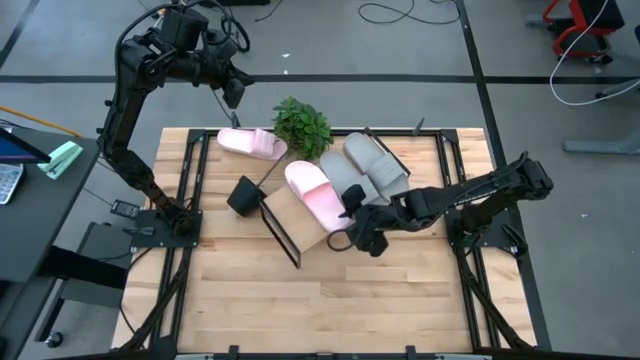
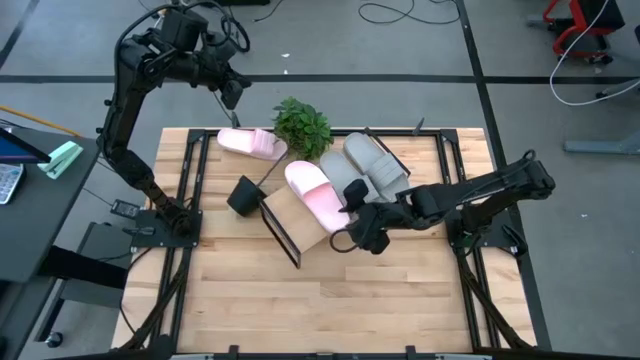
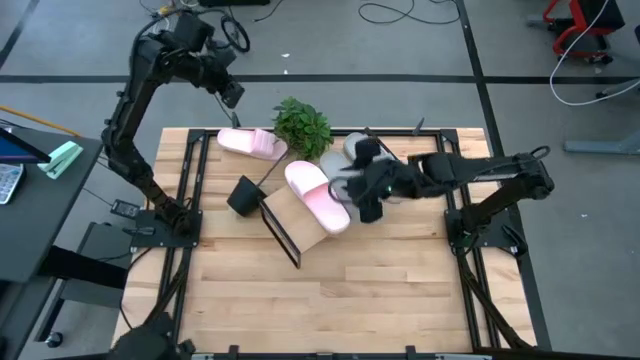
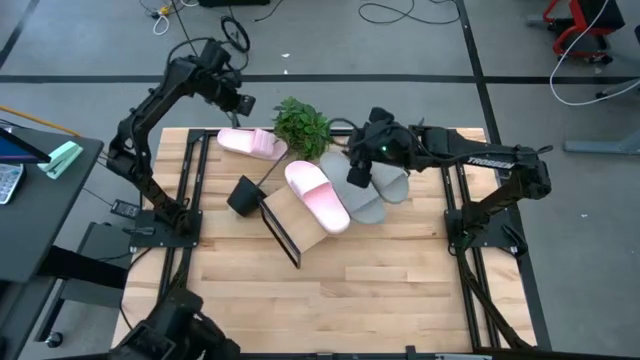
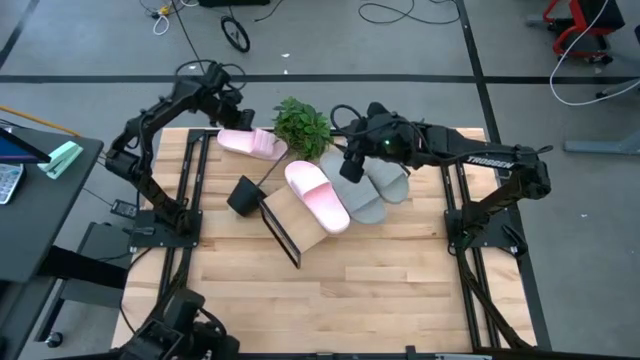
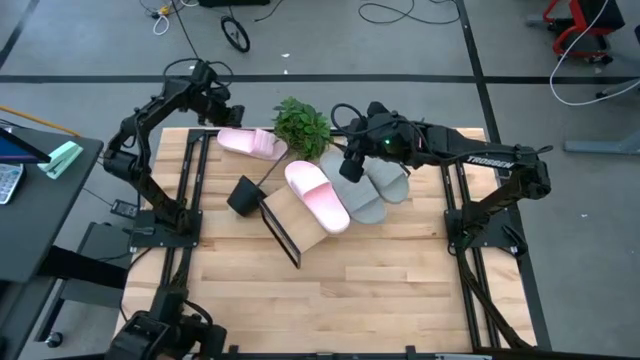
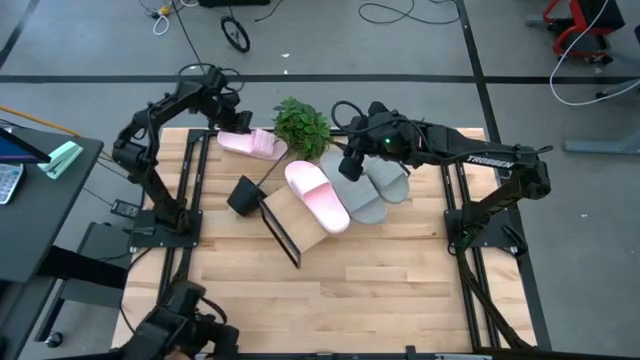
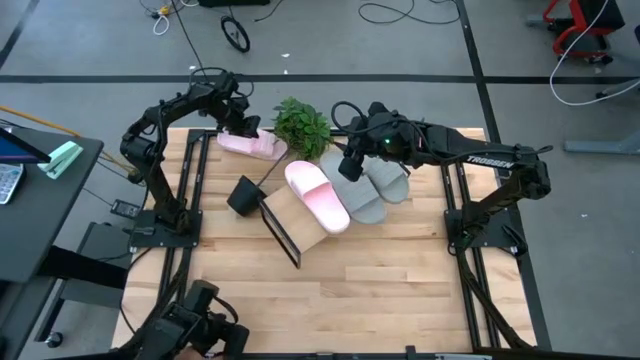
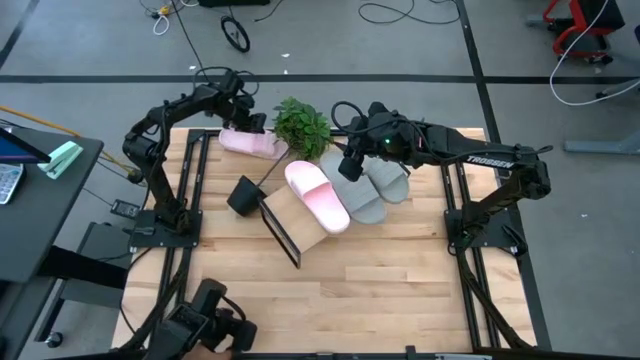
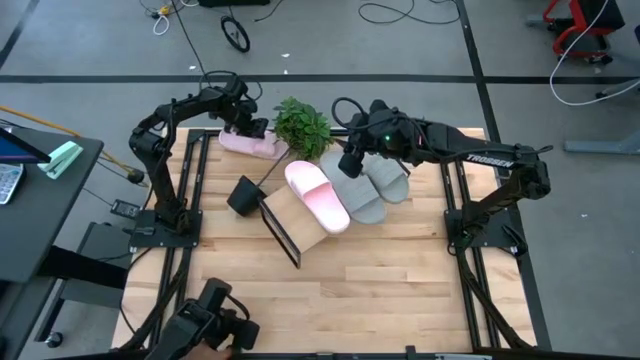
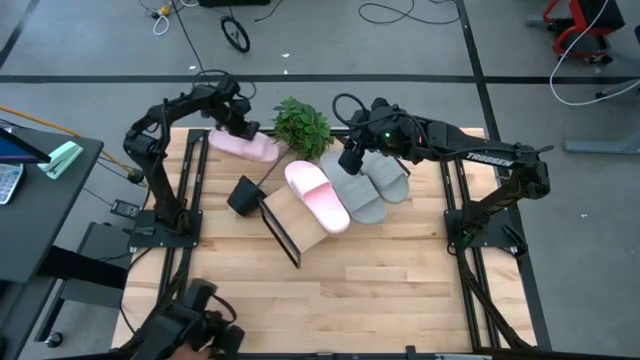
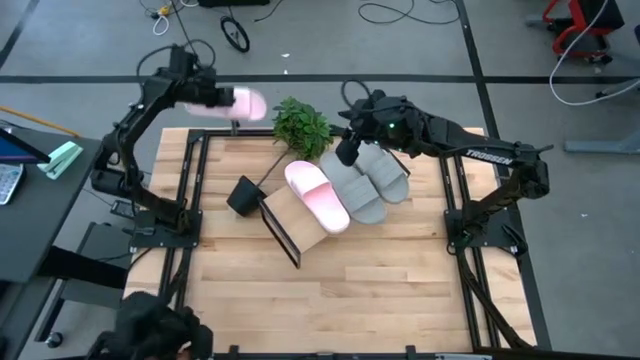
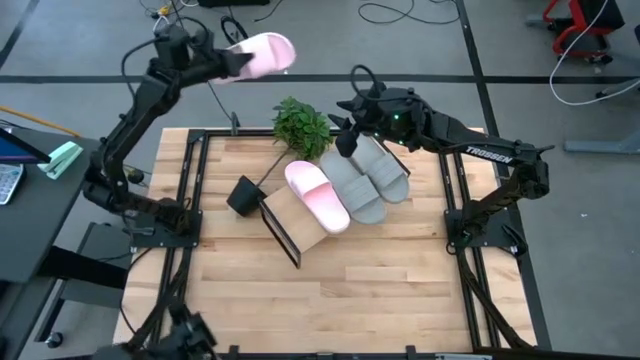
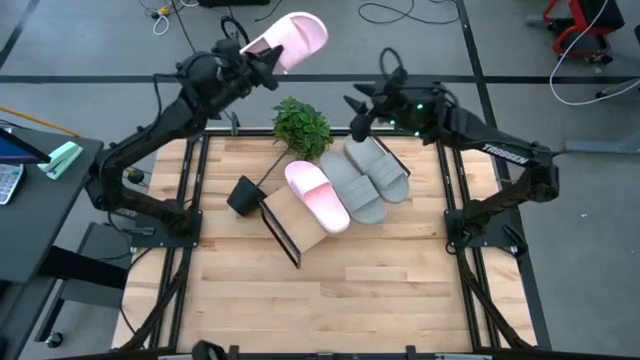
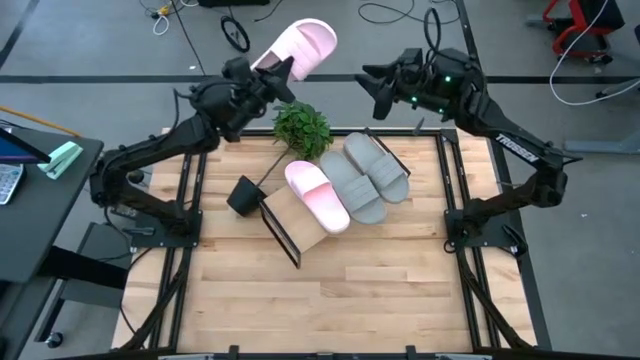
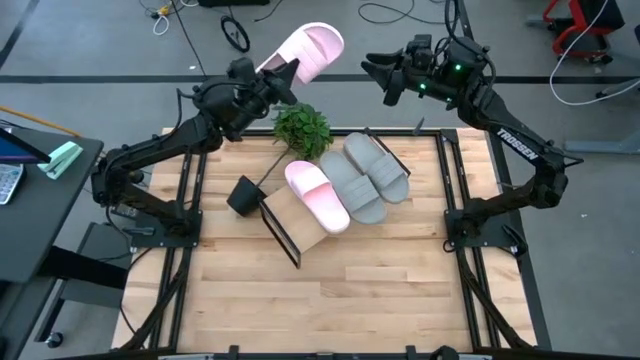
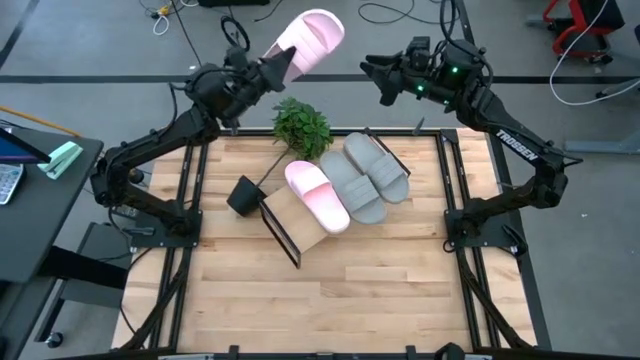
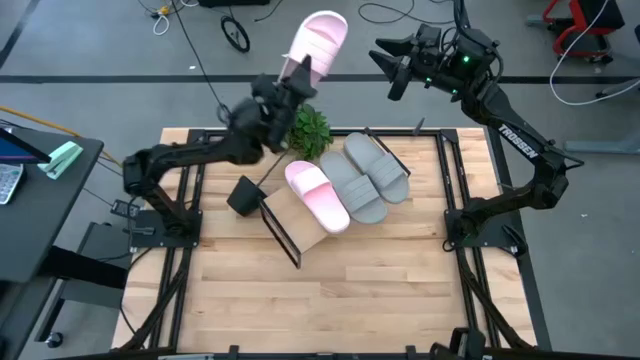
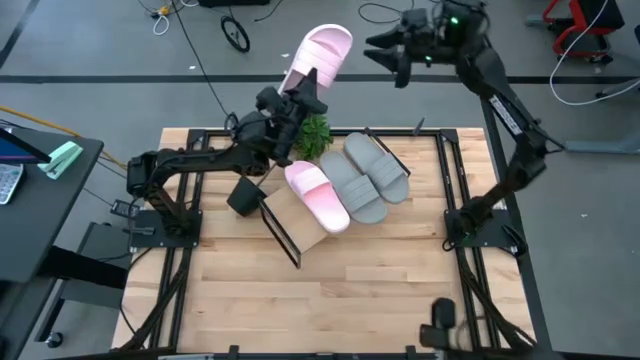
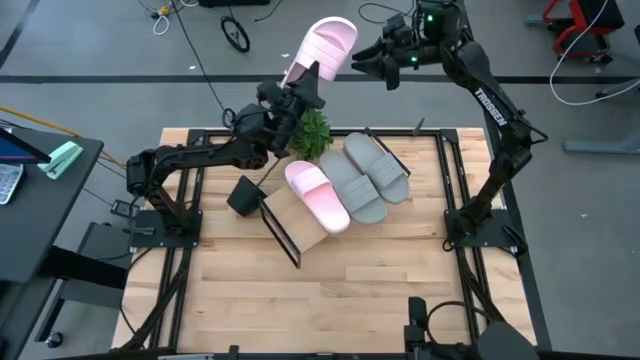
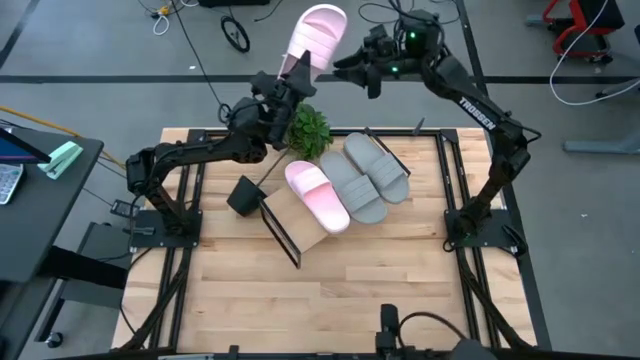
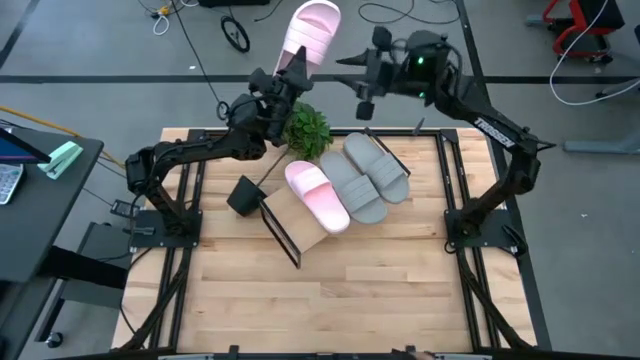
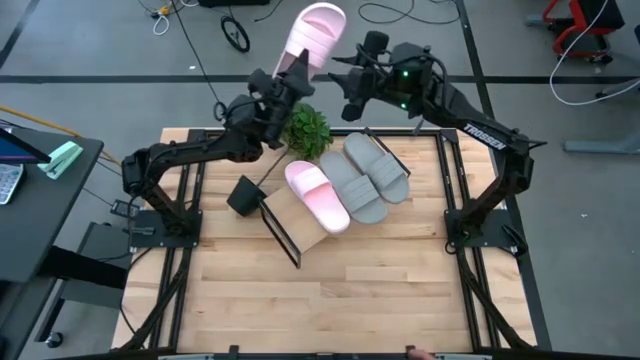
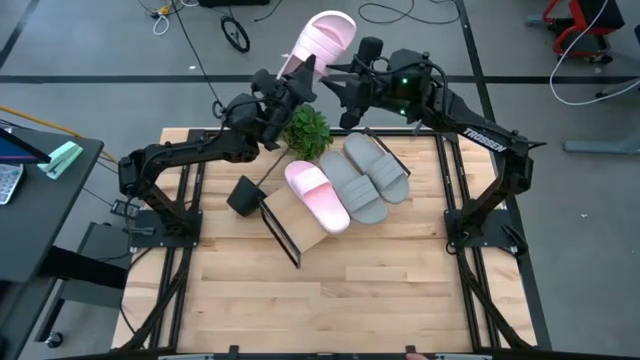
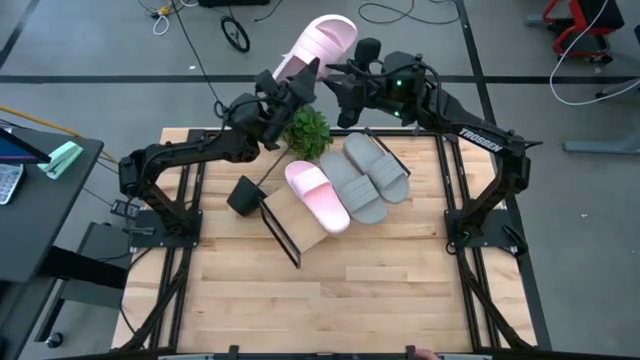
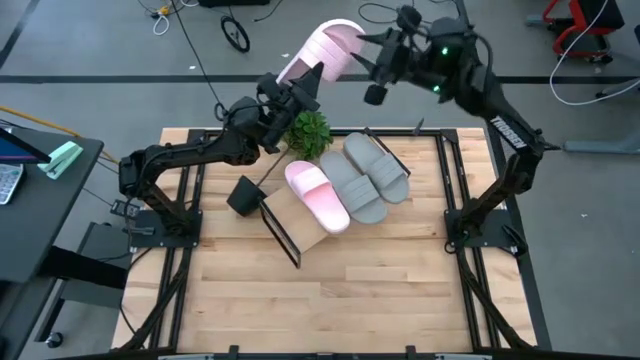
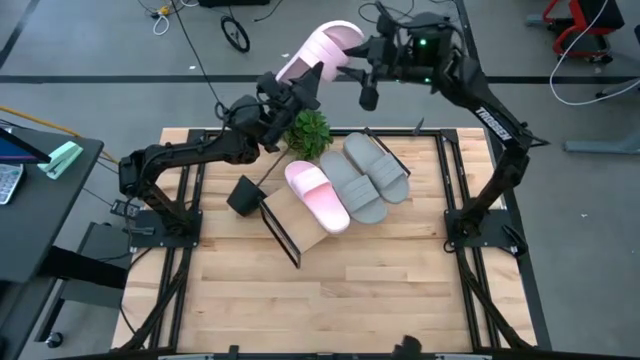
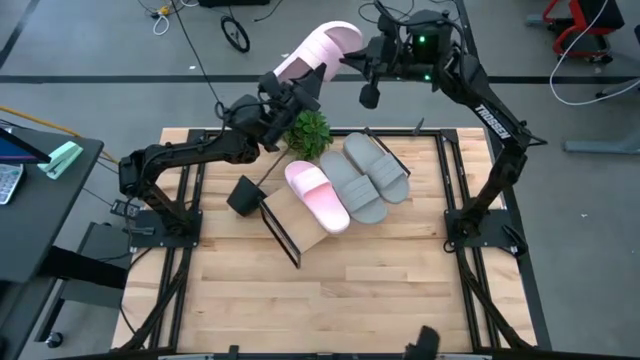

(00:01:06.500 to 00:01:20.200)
Task: Pick and place slides into the shelf
Put the pink slides on the shelf

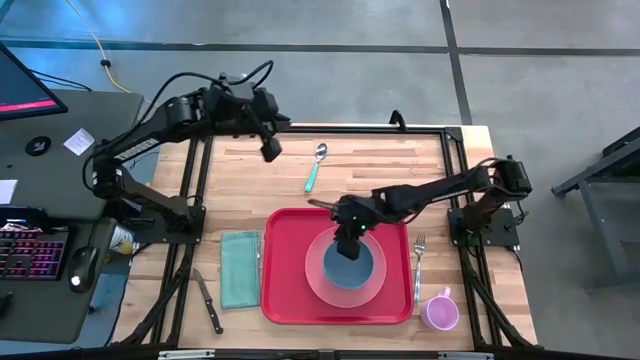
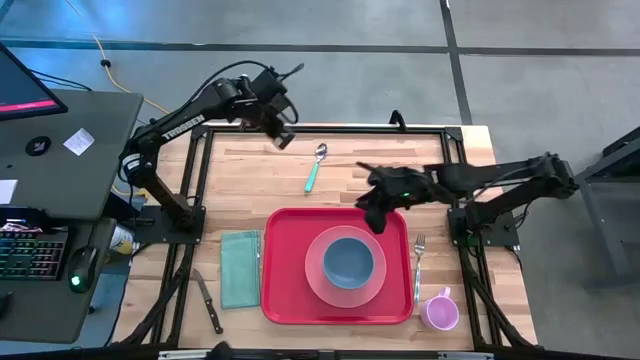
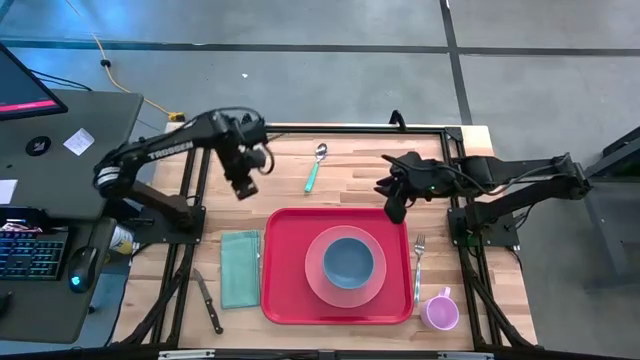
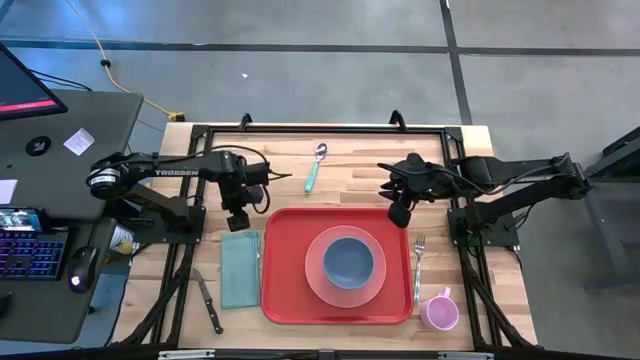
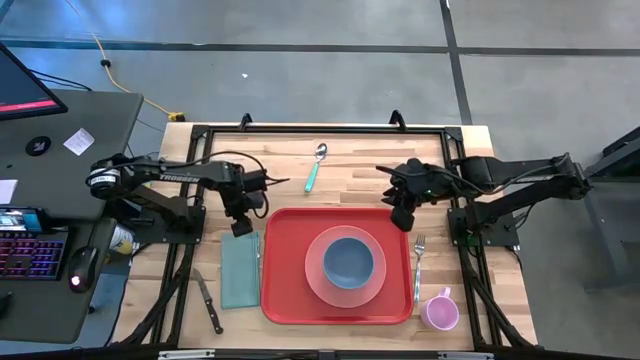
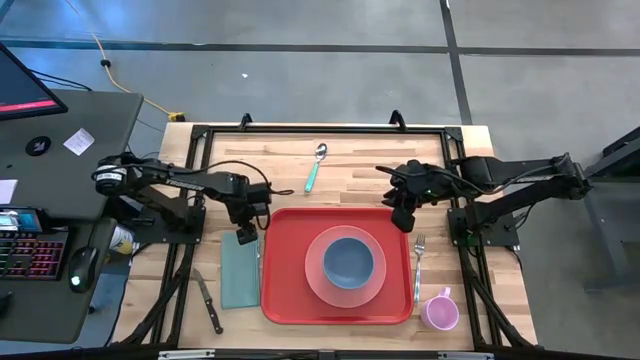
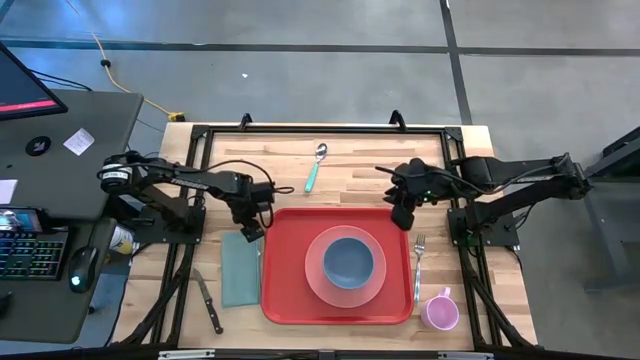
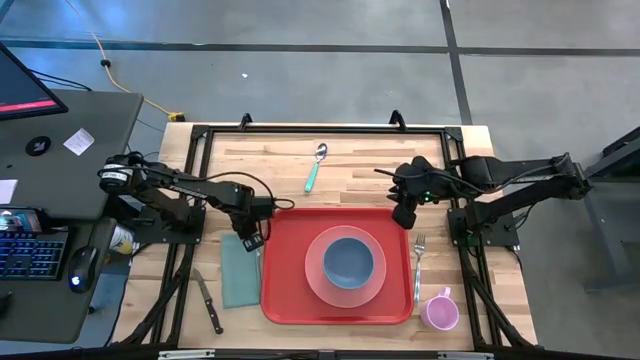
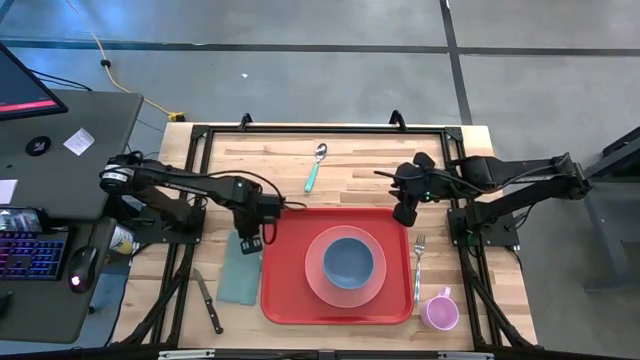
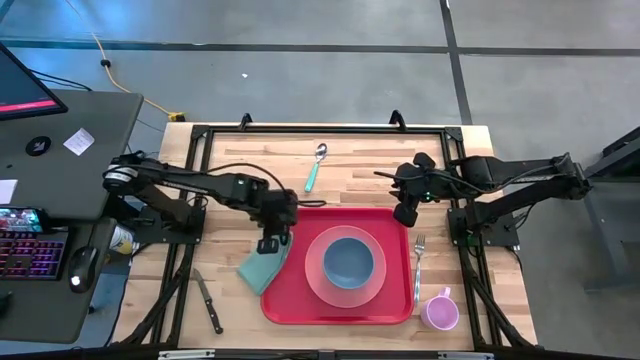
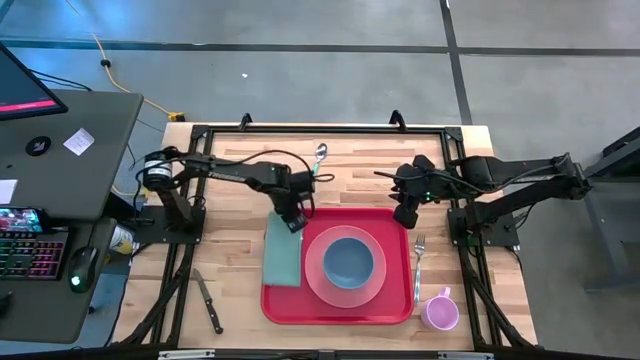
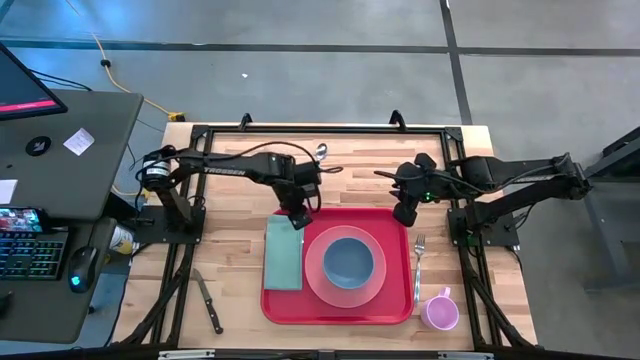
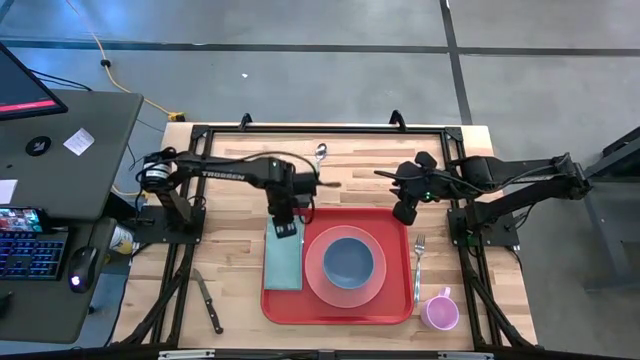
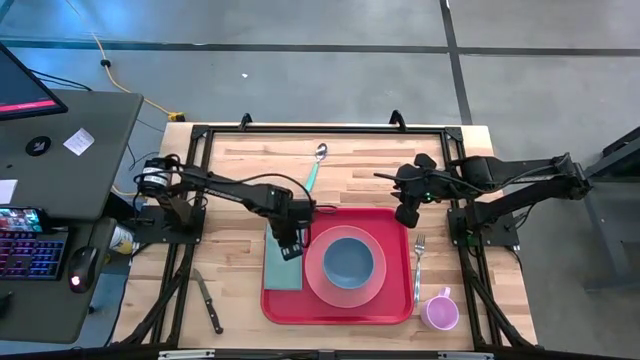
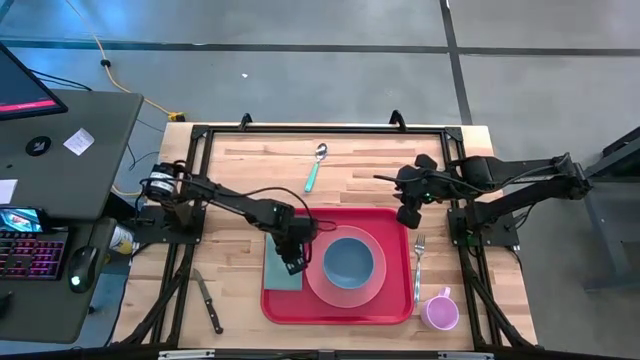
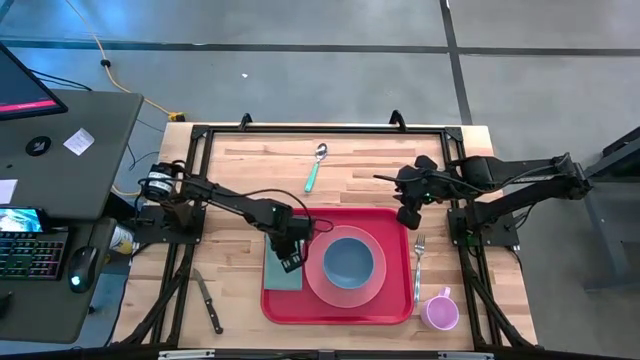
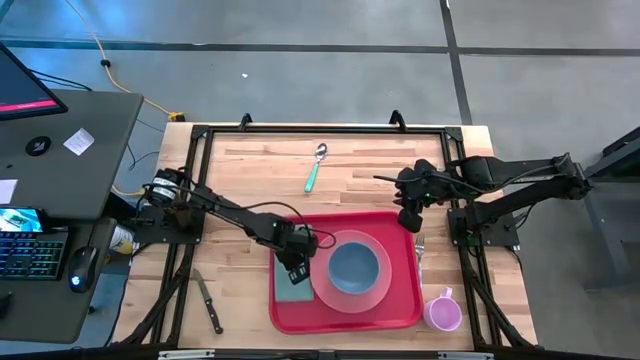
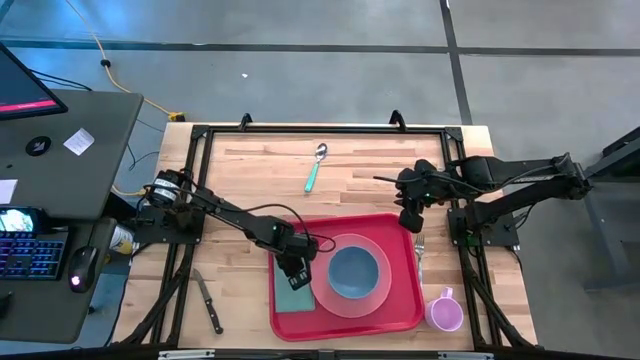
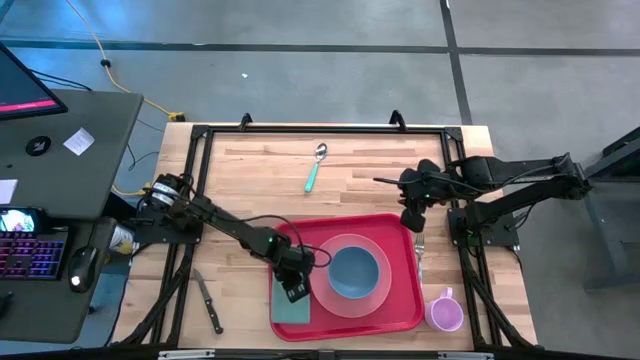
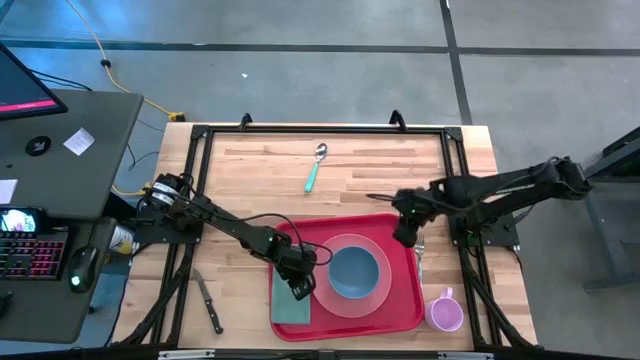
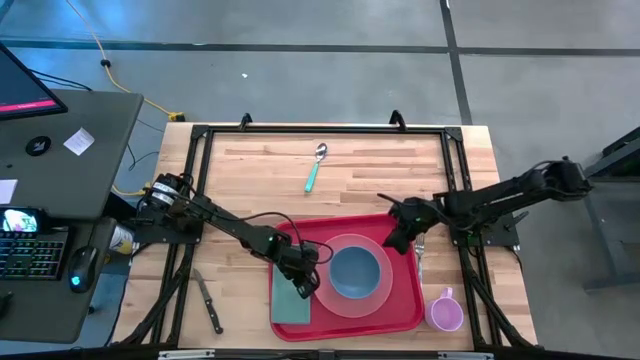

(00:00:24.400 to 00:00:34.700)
Task: Set up tray
Put the blue napkin on the left of the red tray
